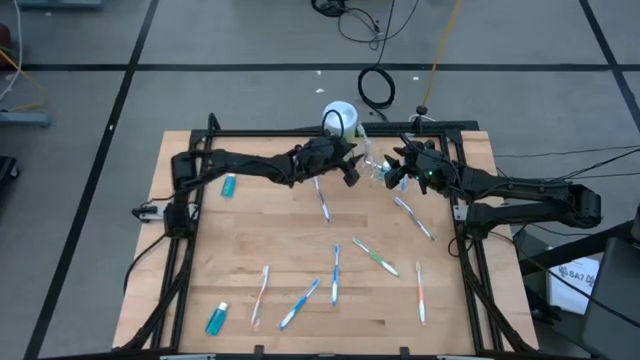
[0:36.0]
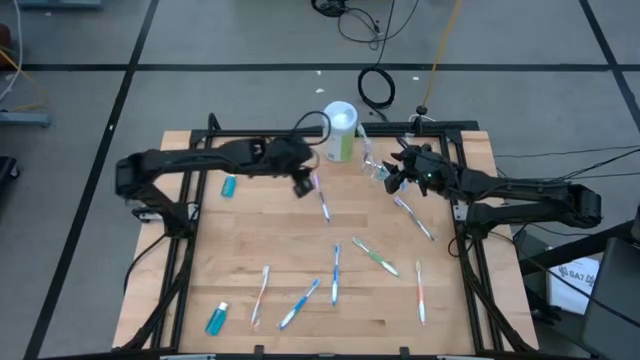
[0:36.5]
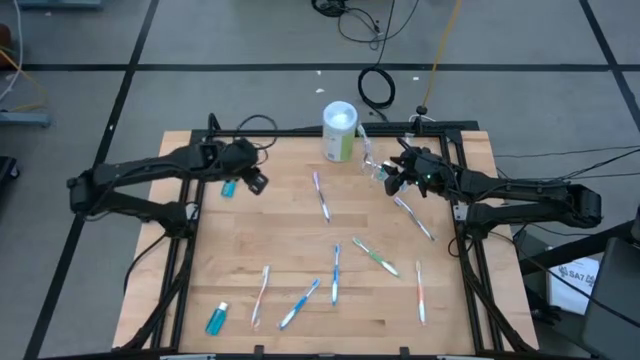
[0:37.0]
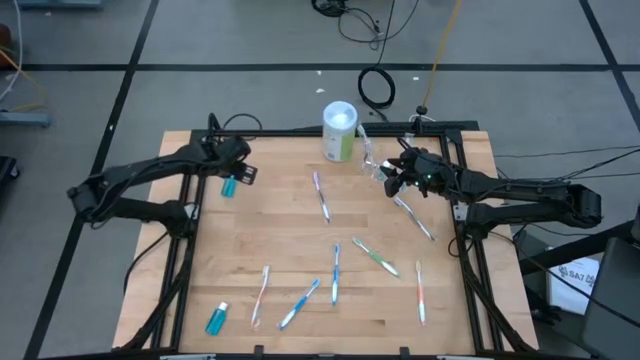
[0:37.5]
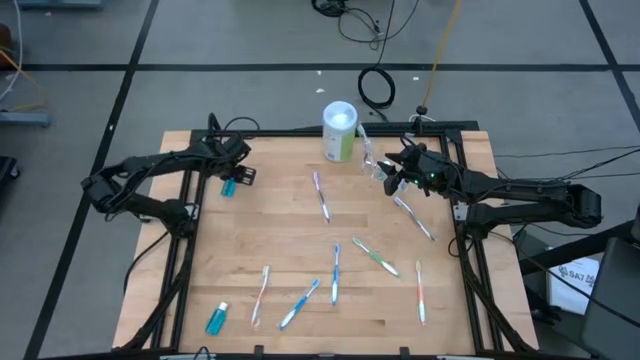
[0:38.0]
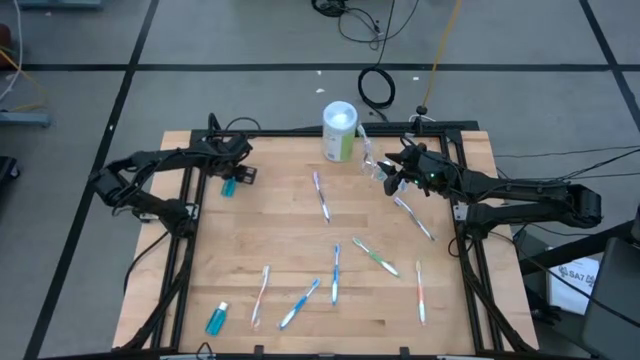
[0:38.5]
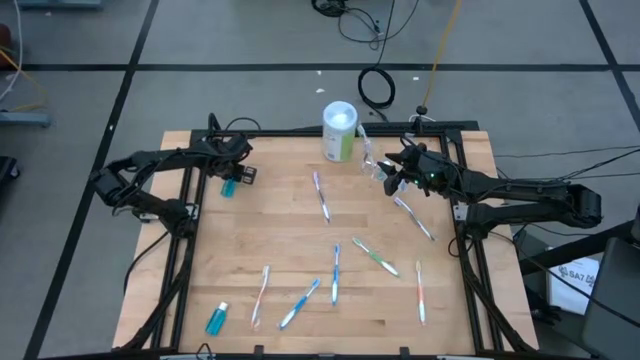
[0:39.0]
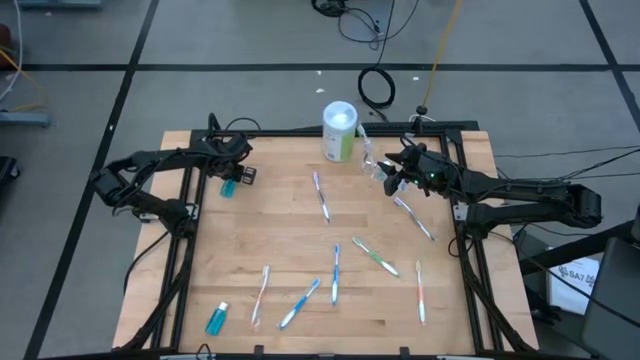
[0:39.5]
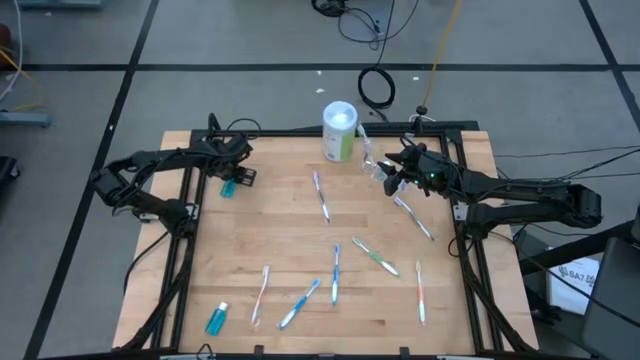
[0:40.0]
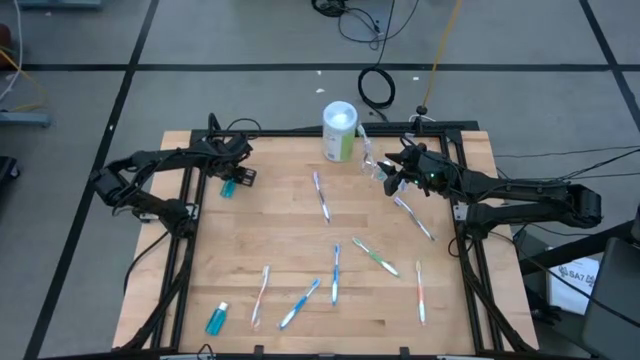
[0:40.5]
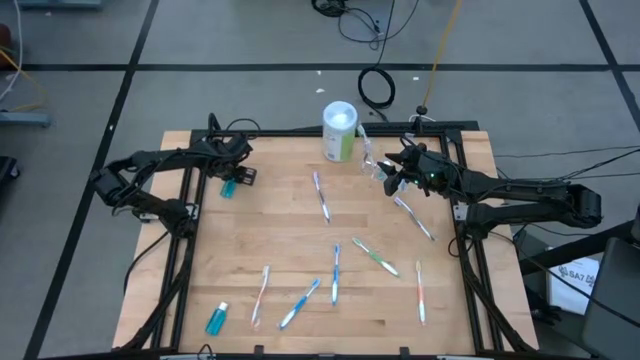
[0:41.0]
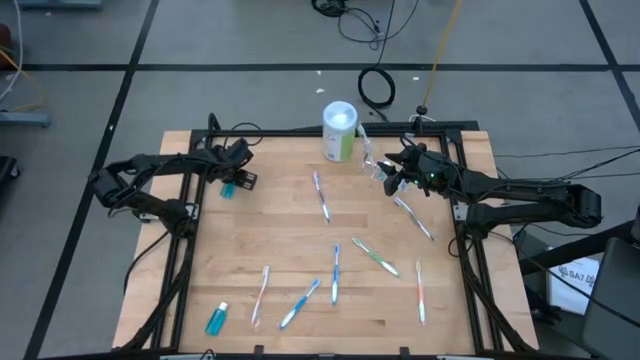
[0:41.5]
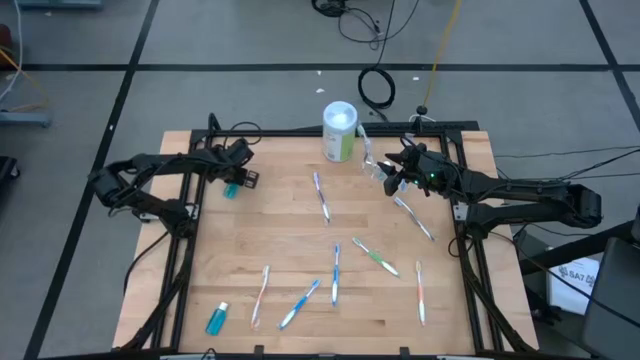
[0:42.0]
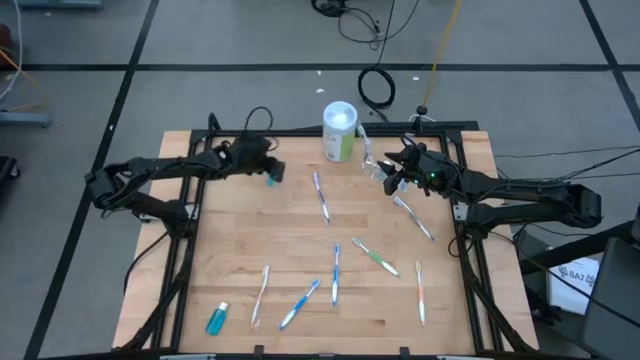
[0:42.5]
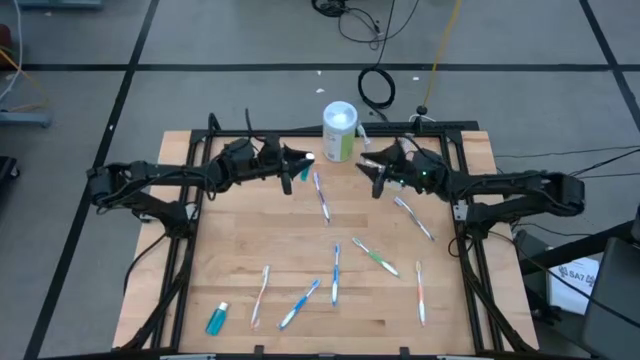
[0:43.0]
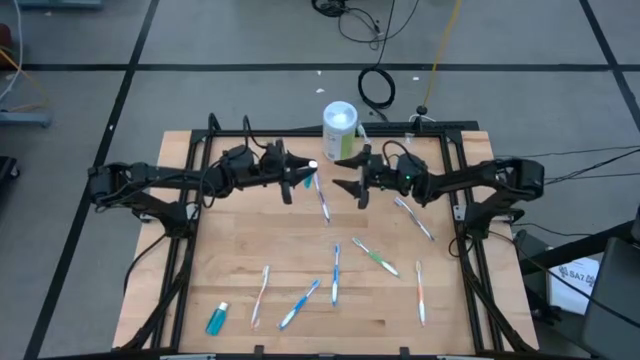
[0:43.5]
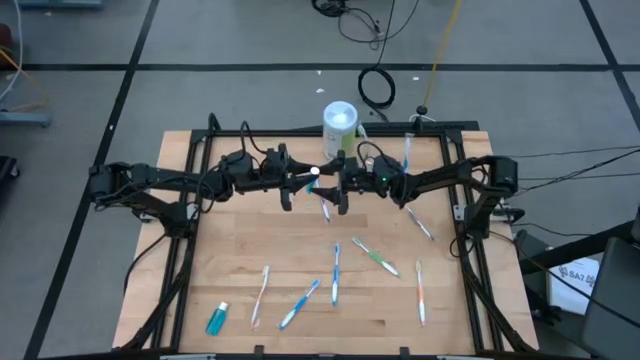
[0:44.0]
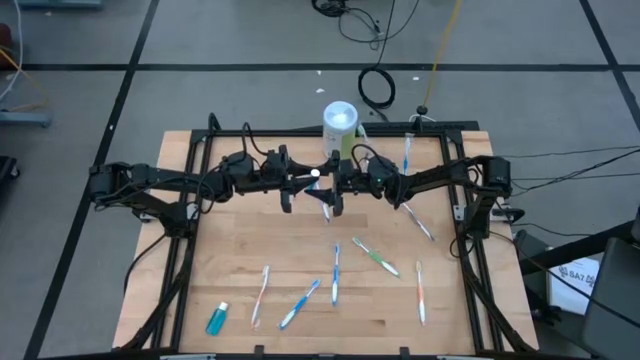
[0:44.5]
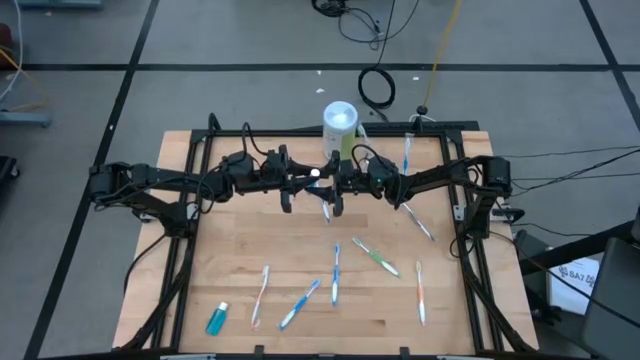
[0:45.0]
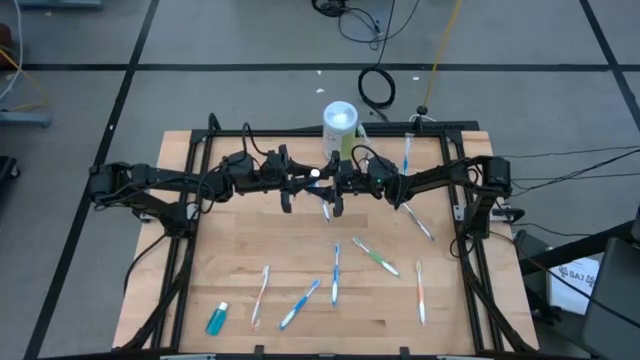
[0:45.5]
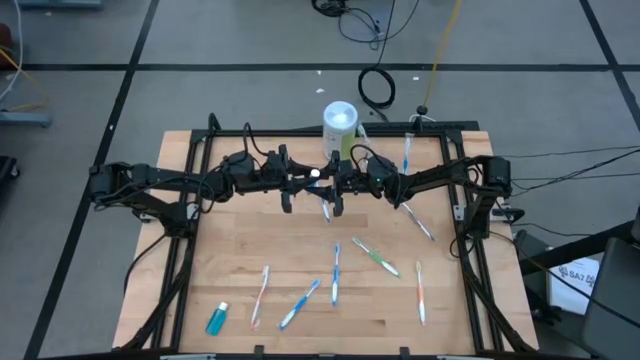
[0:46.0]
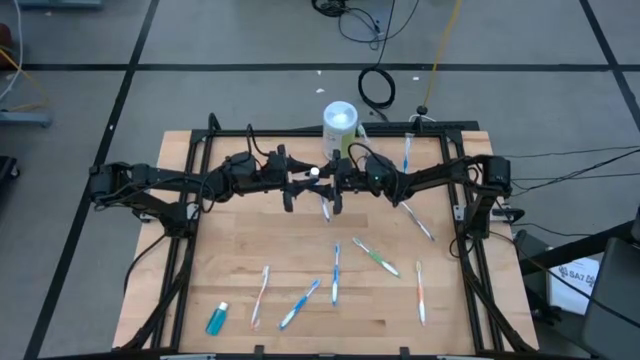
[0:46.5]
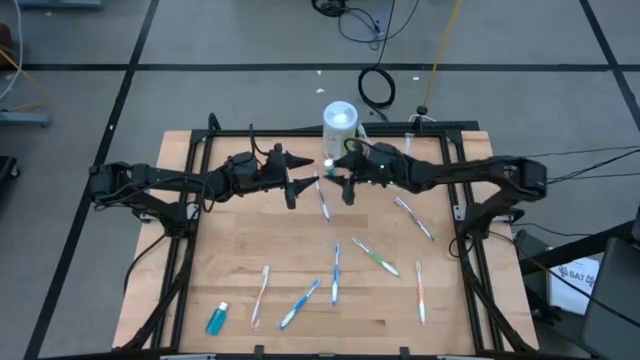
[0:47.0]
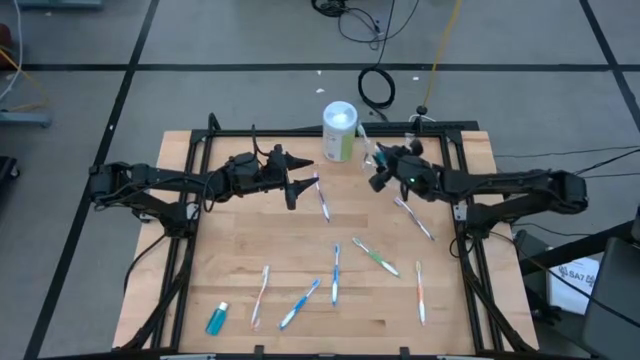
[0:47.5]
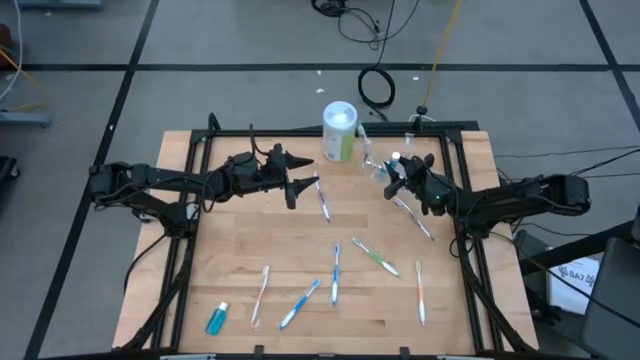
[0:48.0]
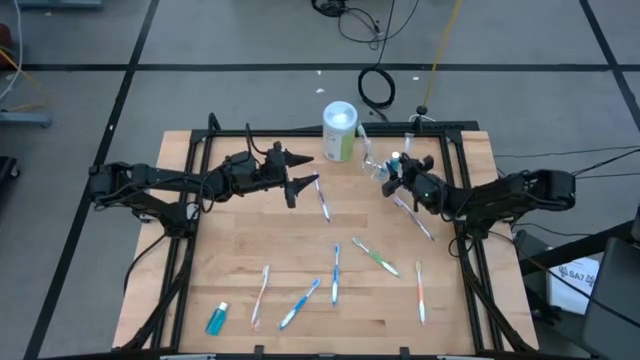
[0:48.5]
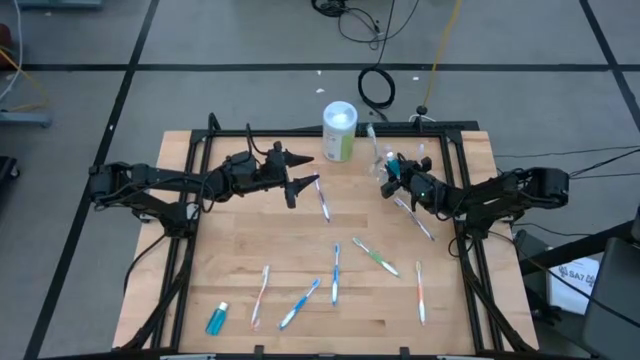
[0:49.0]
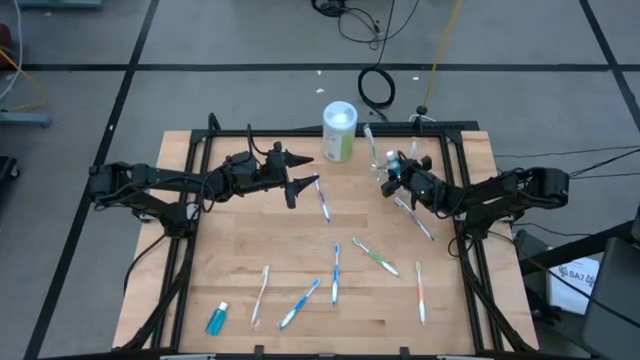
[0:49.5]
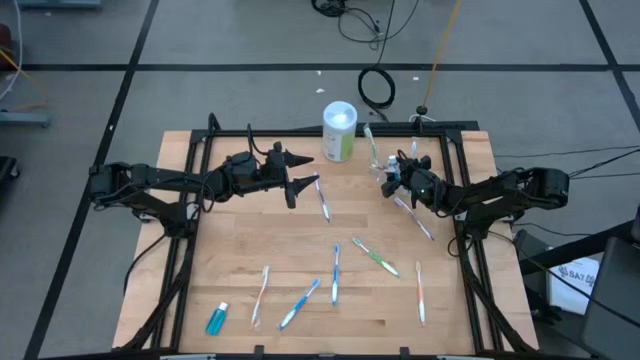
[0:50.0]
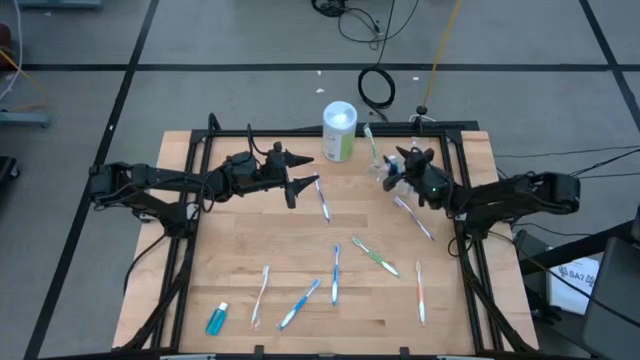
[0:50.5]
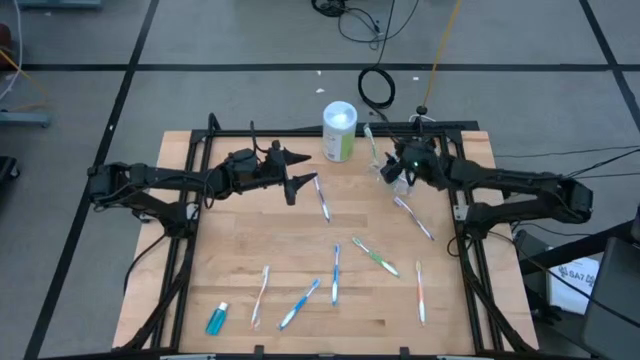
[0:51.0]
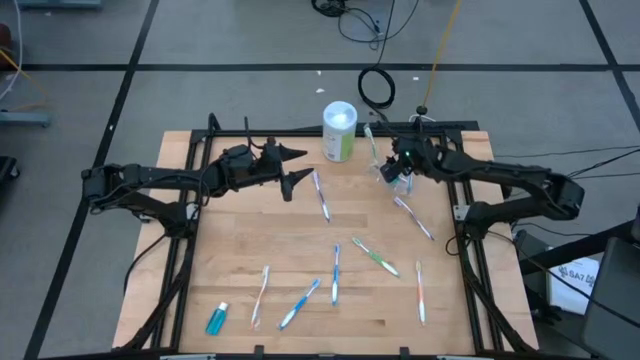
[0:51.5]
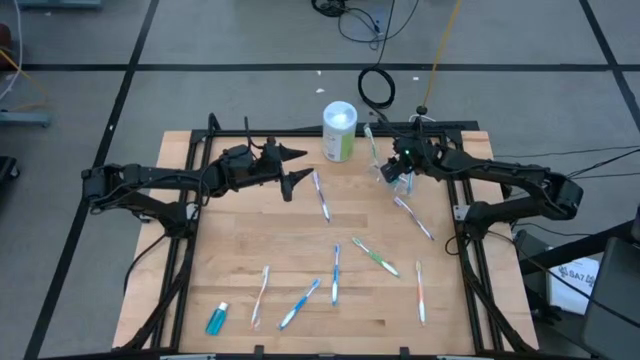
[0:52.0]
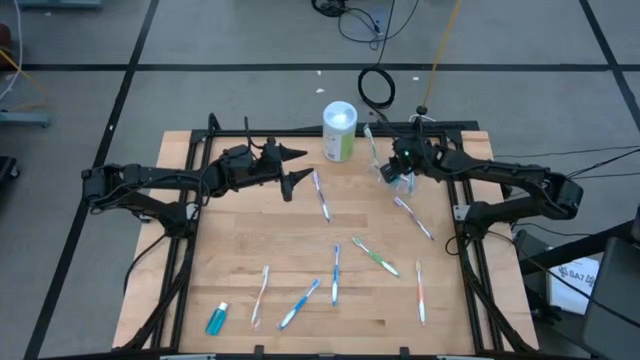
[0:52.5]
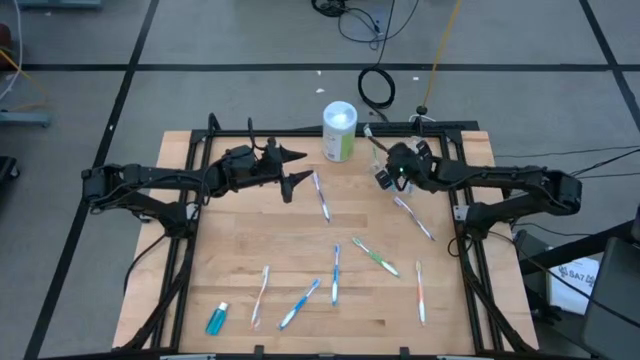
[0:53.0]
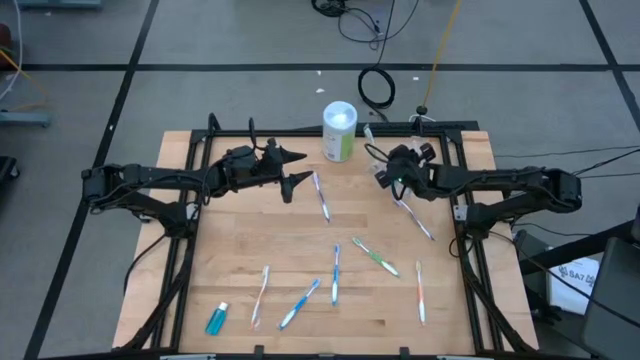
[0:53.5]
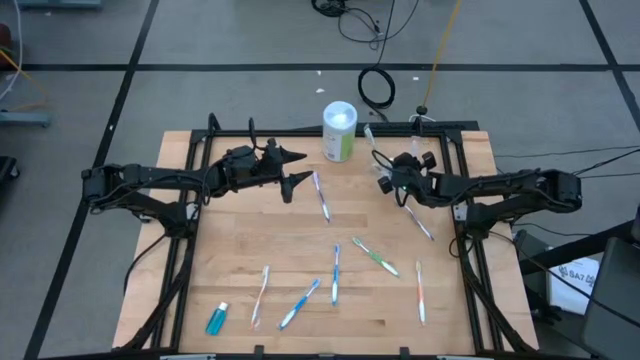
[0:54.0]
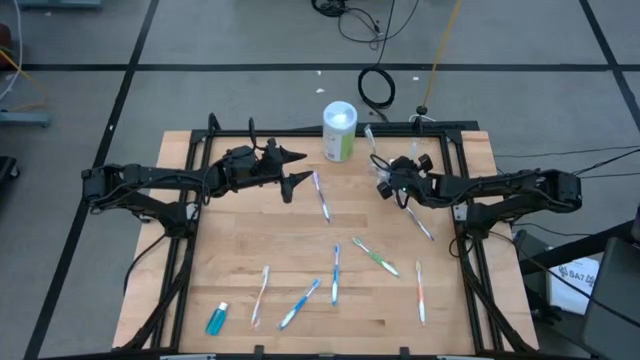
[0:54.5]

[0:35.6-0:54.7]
Task: Pick & Place toothbrushing station
Put the top blue mouthwash into the transparent organizer

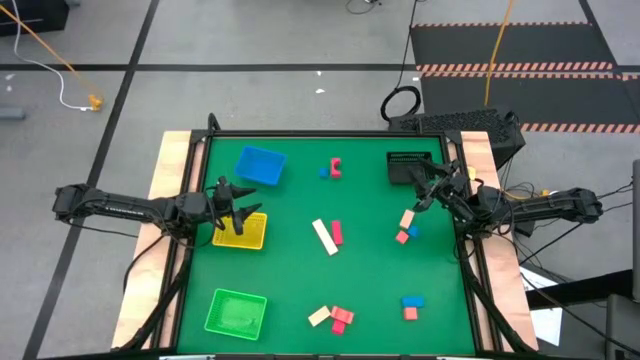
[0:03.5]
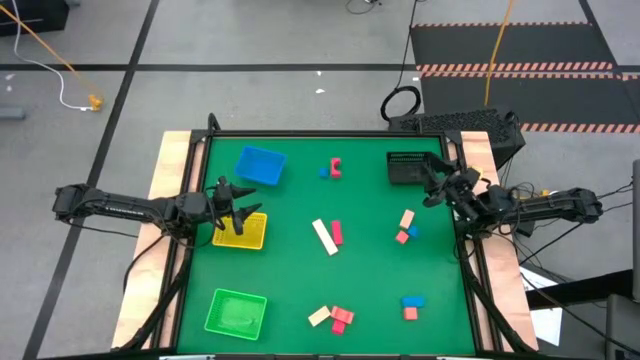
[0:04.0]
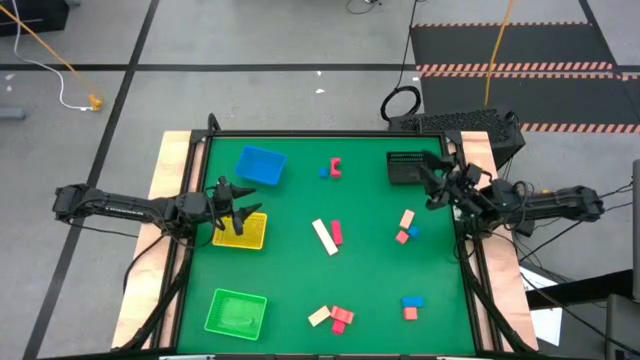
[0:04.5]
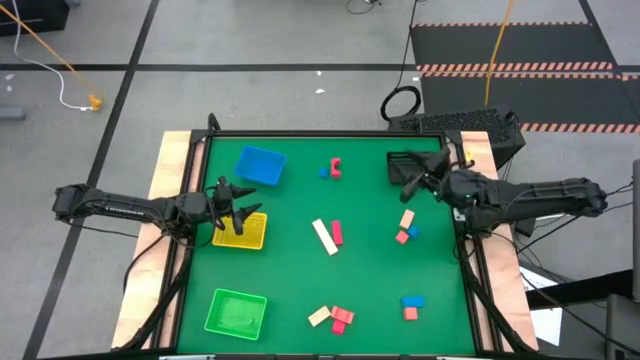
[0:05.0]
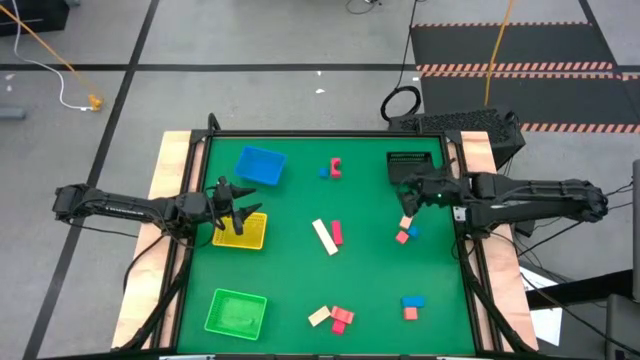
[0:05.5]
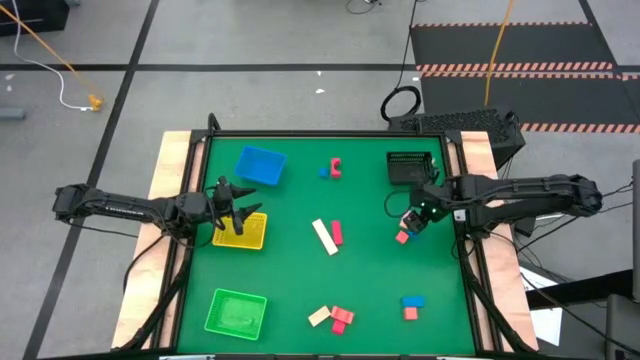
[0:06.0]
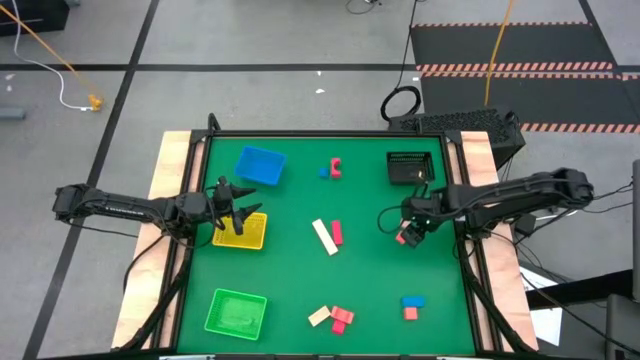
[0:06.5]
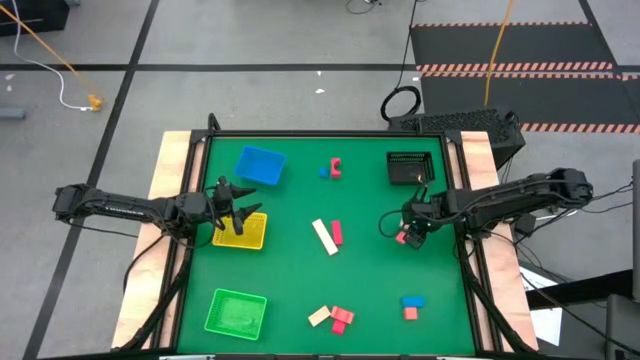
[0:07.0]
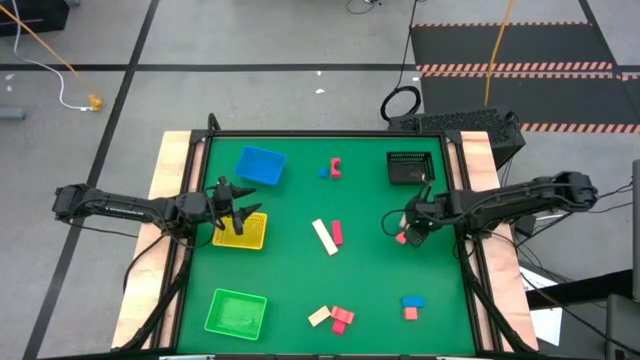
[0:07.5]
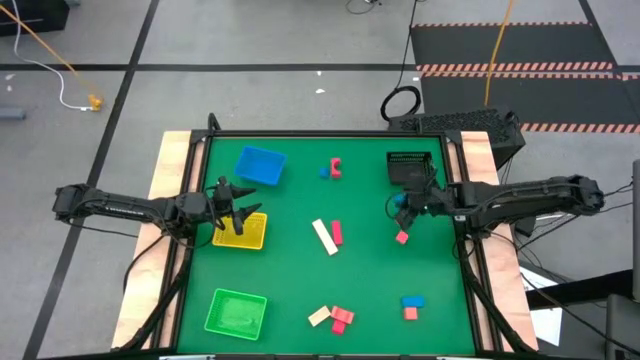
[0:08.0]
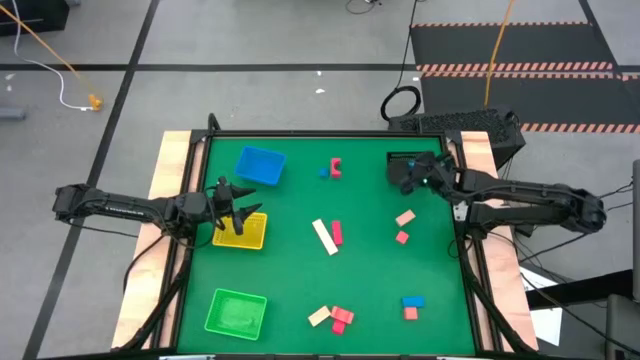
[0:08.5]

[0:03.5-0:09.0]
Task: Sort & place blocks by color
Put the middle blue block into the black bin
